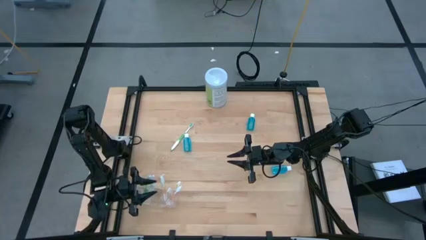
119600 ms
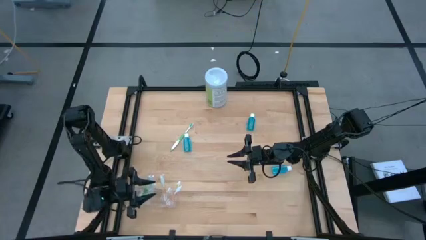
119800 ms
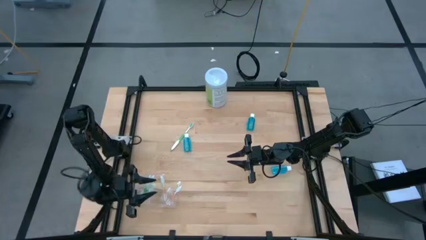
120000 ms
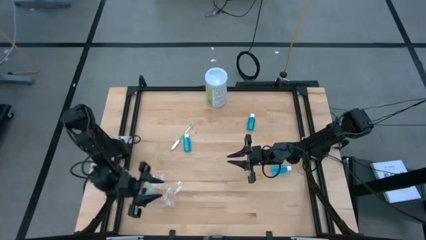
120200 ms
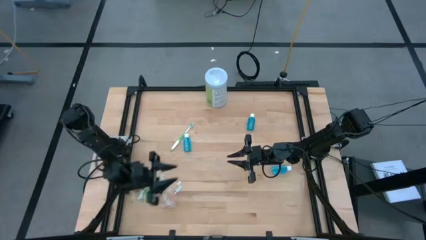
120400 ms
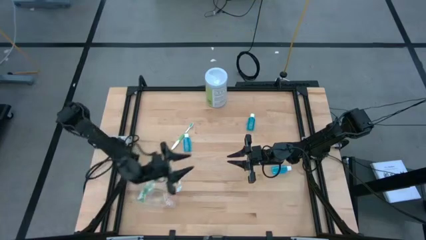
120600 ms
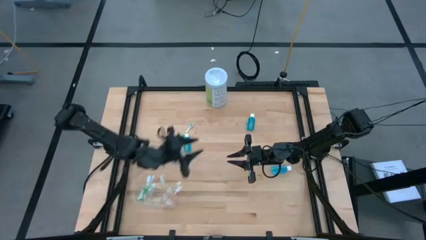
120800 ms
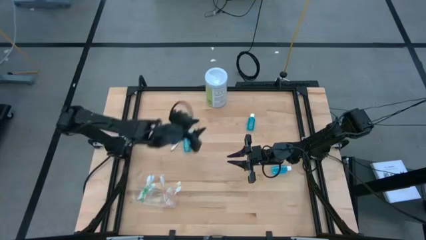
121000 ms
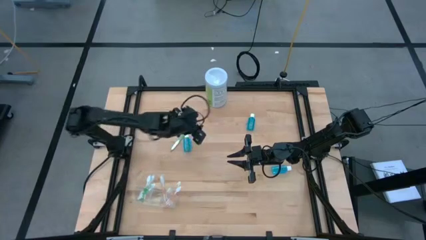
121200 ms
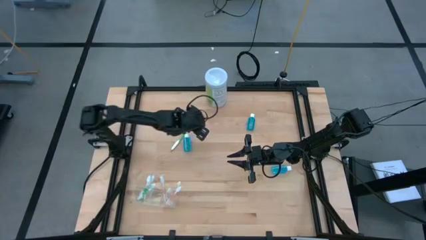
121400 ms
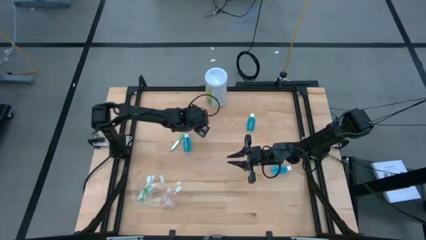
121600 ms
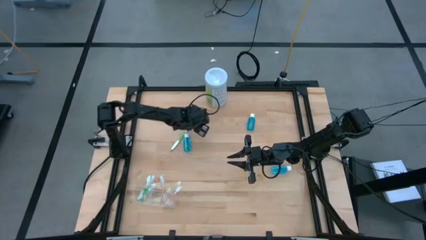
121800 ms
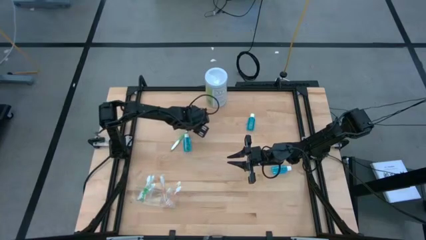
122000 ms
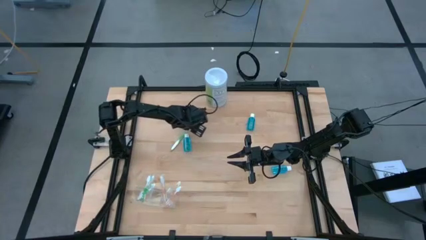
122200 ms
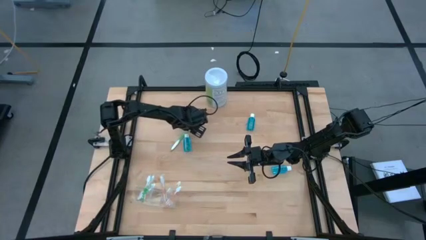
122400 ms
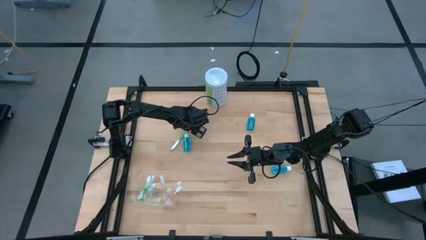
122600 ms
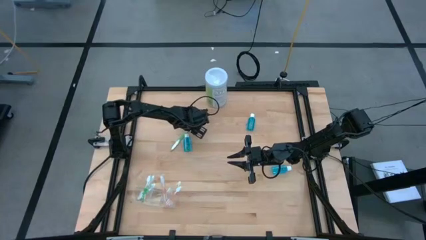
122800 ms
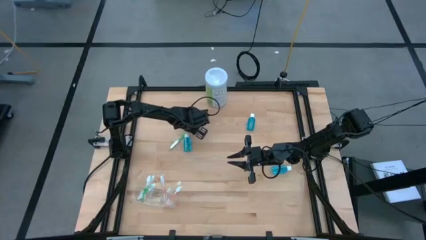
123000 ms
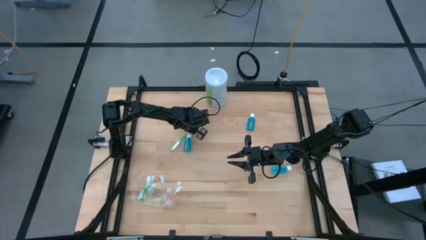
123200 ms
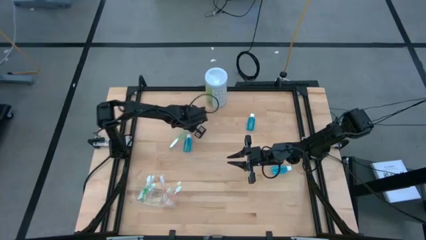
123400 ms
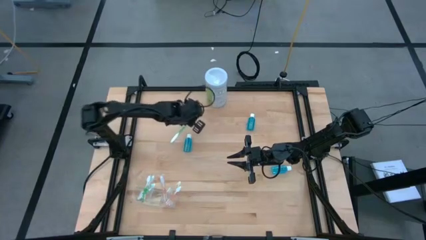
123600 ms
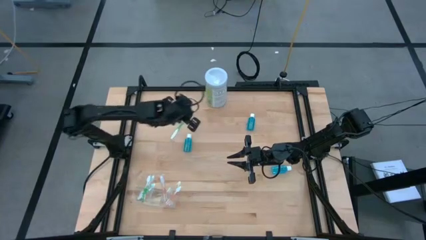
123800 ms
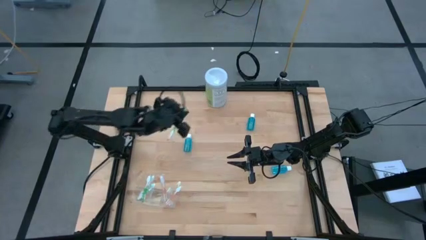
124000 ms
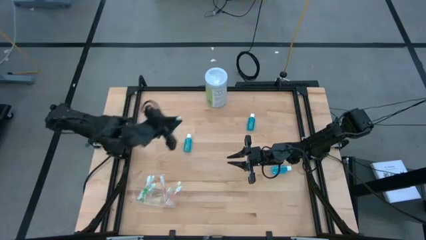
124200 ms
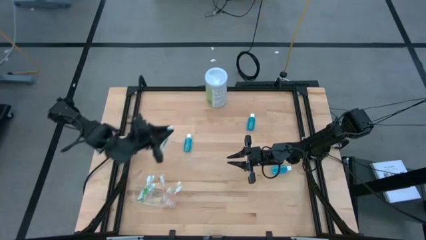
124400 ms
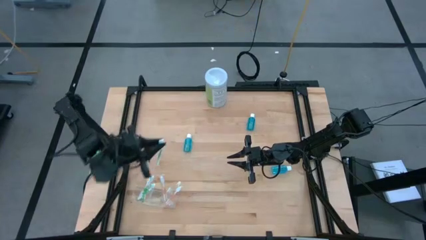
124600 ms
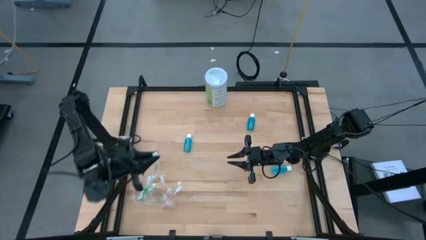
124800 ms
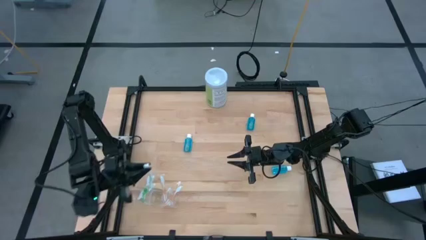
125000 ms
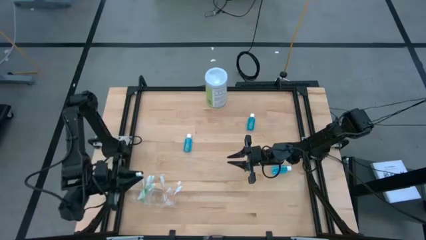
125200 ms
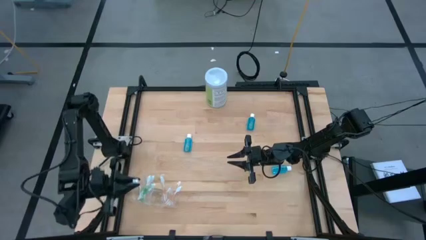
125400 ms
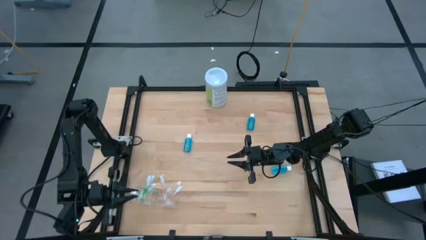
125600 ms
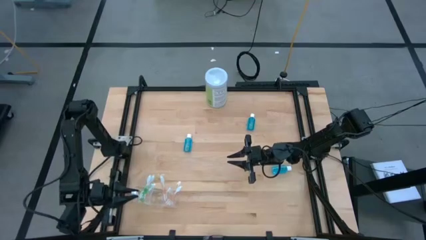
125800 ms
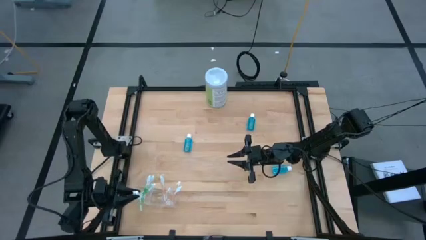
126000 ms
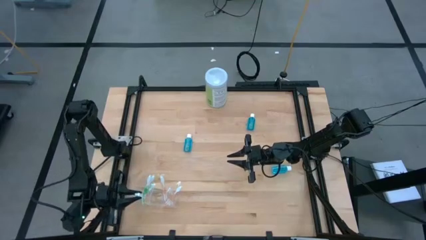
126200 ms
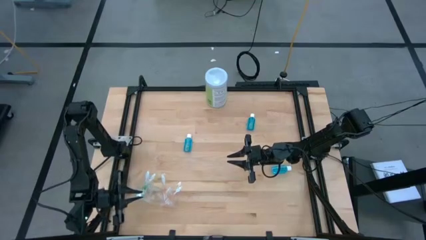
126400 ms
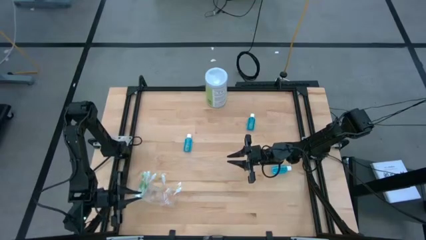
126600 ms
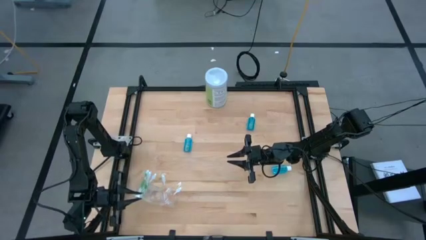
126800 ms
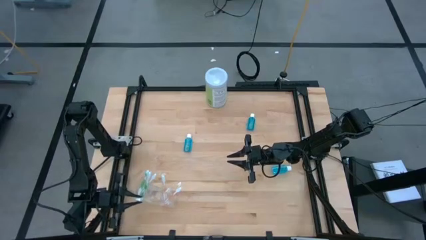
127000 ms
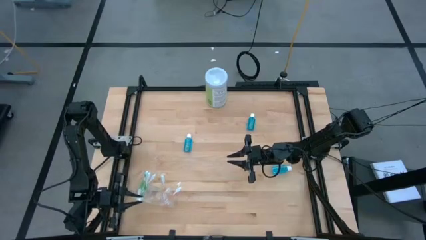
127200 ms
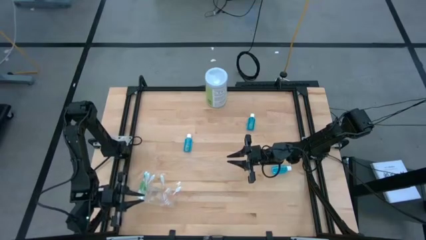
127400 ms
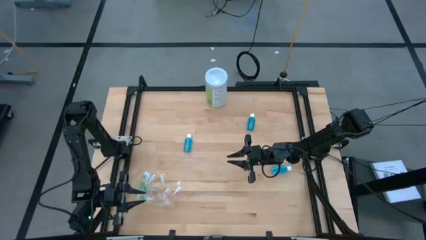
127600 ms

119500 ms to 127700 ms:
Task: Pick & Place toothbrushing station
Put the green toothbrush into the transparent organizer

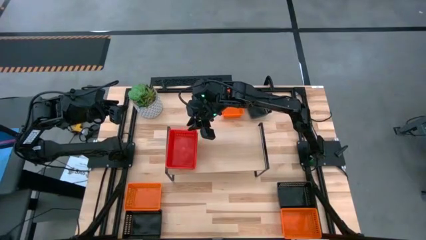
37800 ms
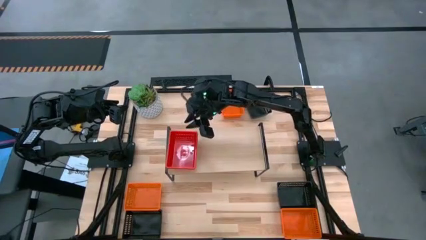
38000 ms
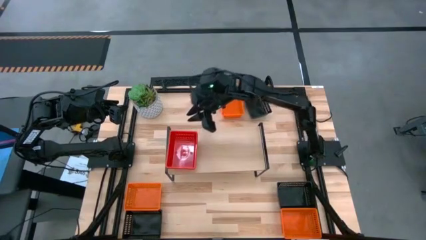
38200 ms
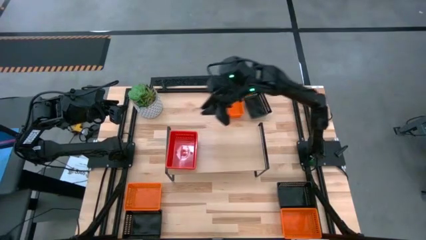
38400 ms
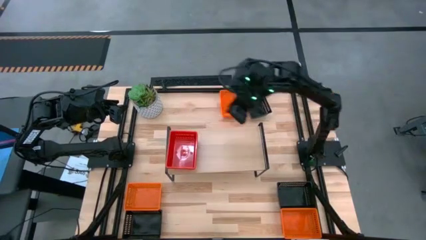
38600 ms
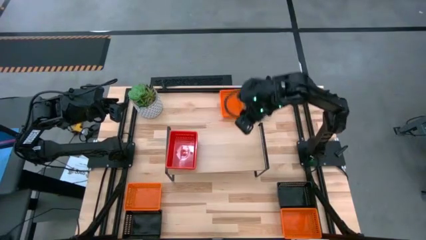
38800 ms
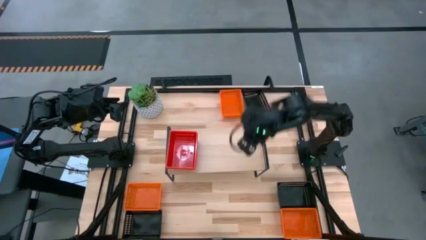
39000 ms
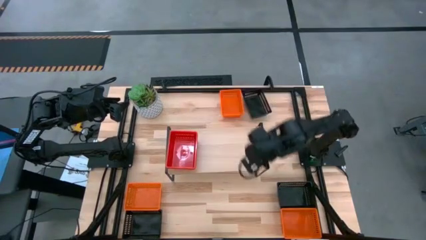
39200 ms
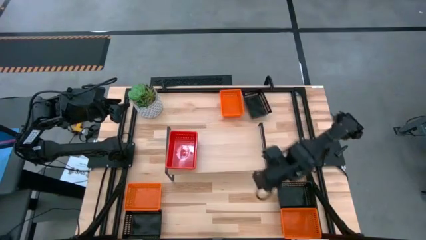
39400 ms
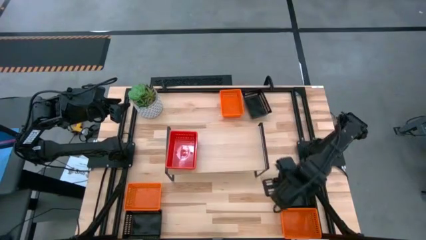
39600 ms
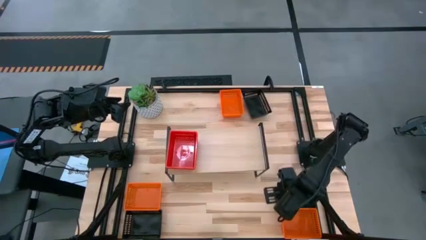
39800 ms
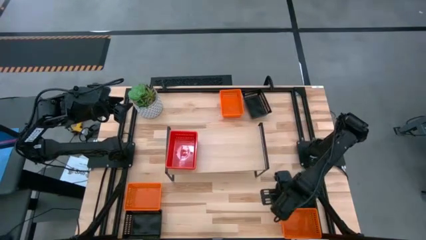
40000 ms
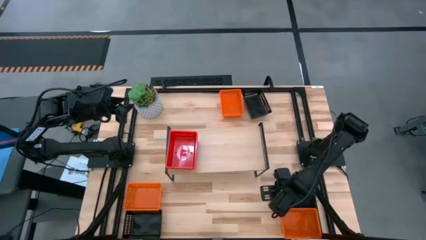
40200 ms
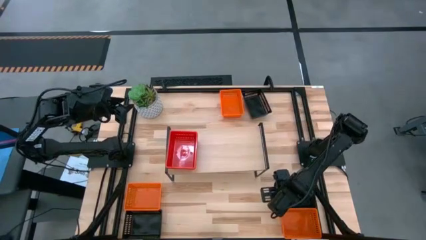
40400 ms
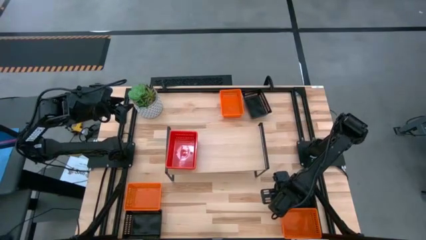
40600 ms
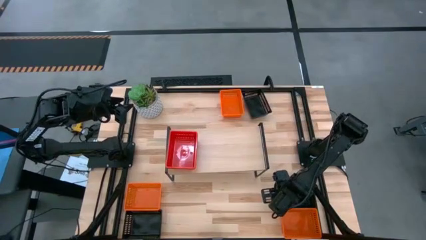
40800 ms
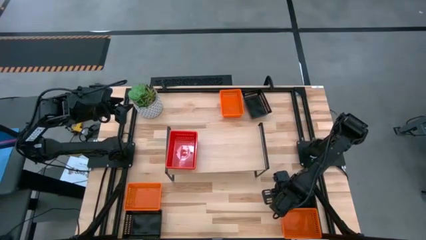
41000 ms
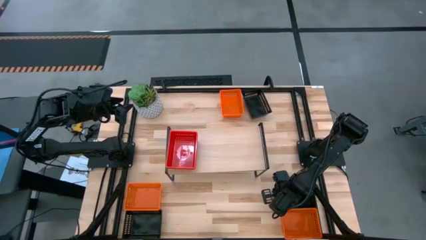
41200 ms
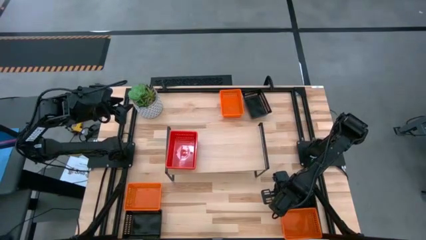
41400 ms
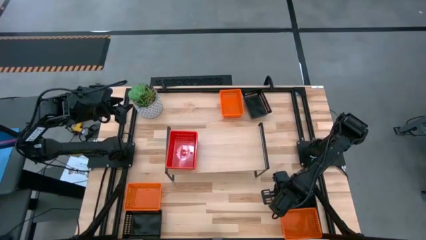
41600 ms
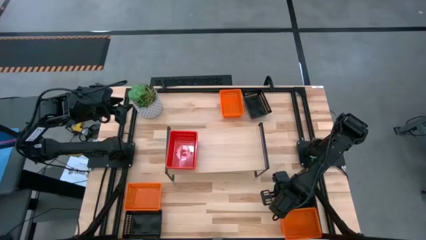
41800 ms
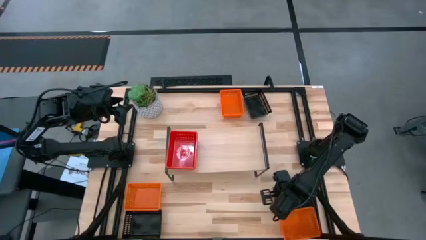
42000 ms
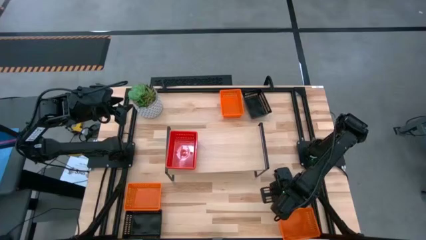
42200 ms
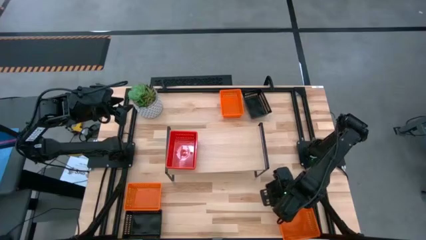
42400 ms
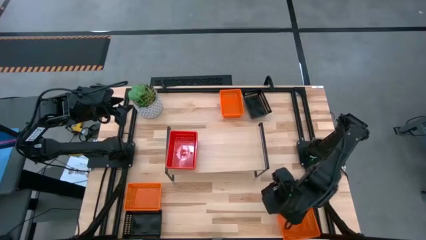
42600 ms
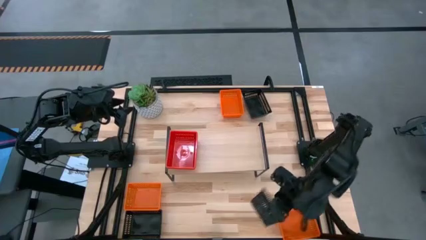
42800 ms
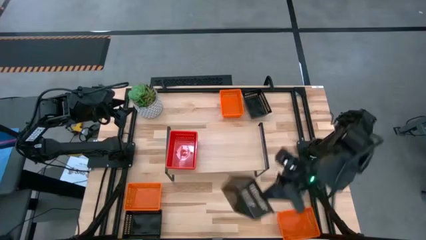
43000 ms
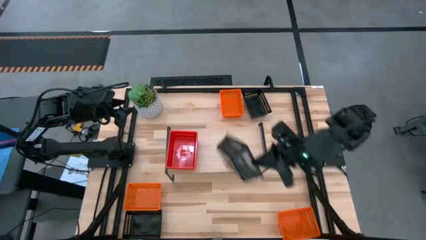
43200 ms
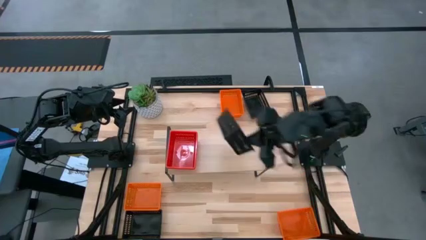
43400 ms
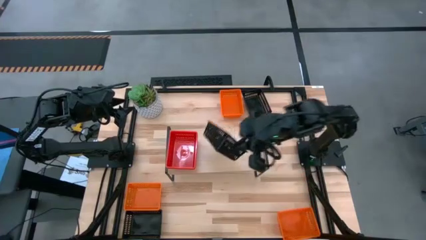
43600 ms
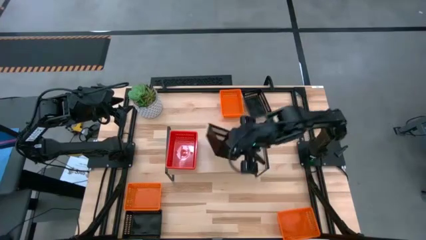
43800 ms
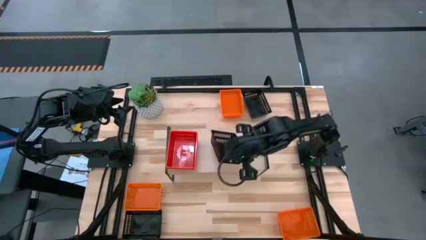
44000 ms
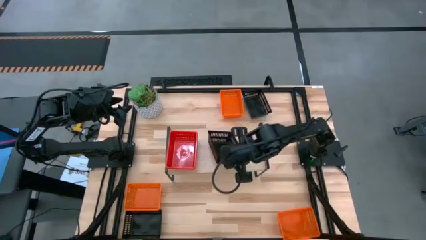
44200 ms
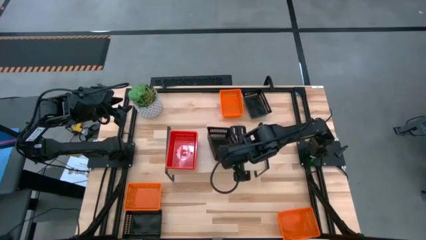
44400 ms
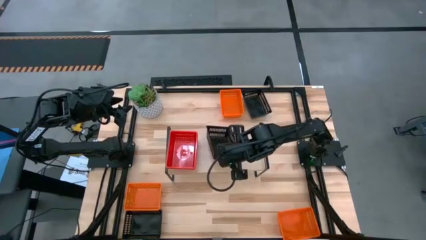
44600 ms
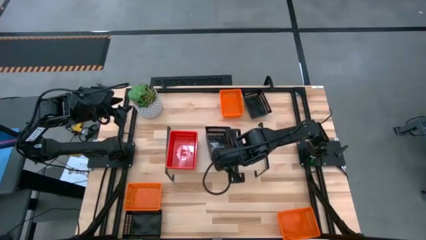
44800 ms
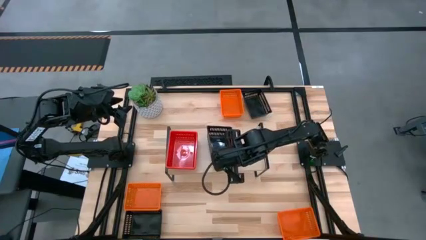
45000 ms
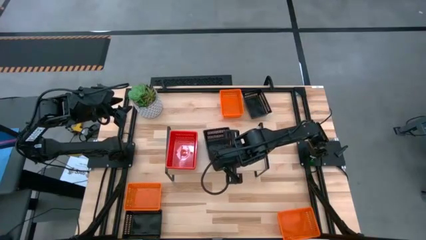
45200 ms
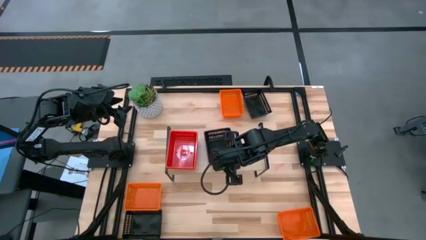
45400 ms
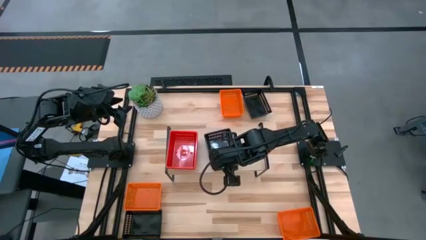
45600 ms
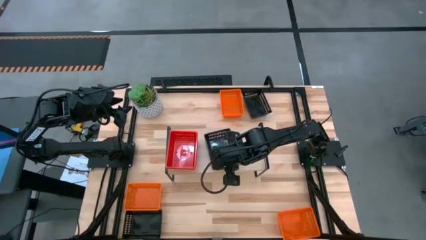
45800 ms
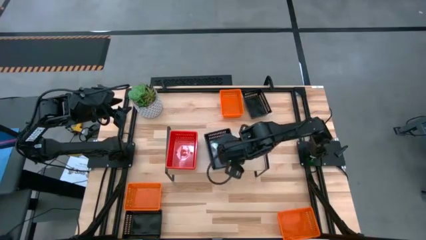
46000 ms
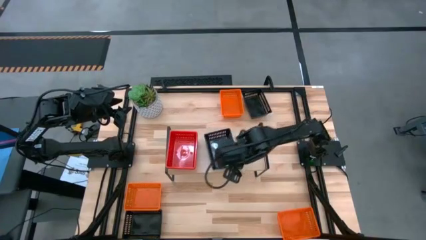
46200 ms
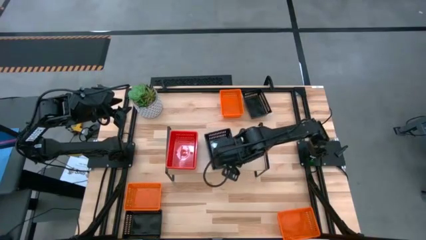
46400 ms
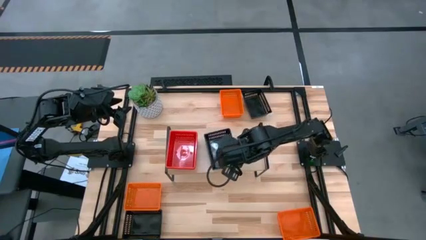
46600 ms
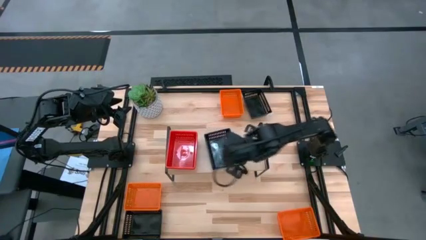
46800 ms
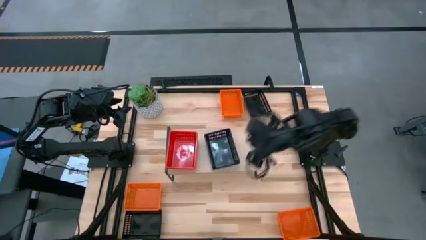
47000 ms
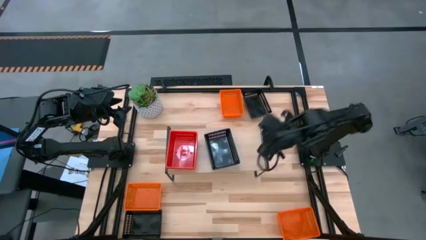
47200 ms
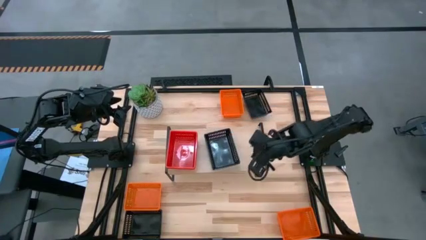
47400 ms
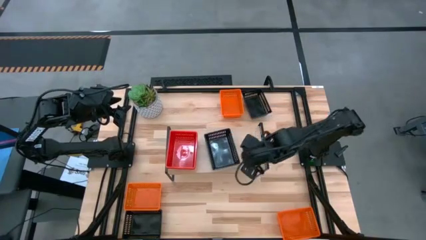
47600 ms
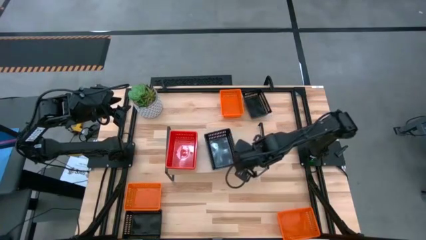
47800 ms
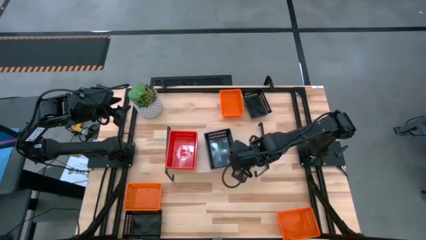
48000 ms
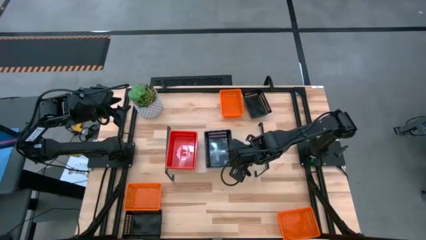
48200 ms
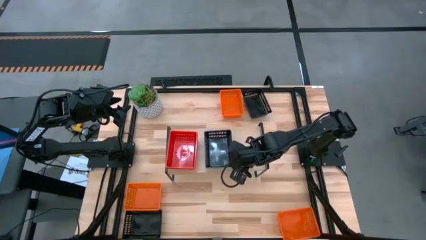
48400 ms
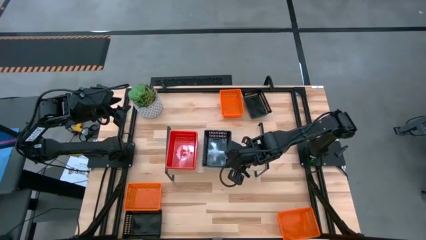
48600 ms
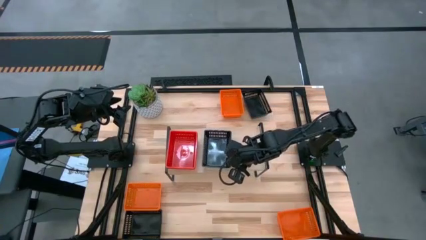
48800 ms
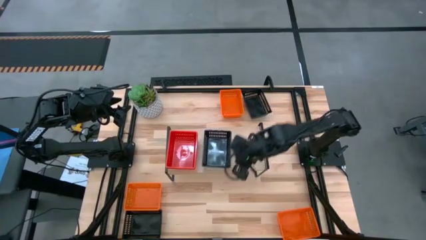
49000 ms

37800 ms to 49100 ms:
Task: Stack baskets on shelf by color
Put the middle black bin on the shelf
